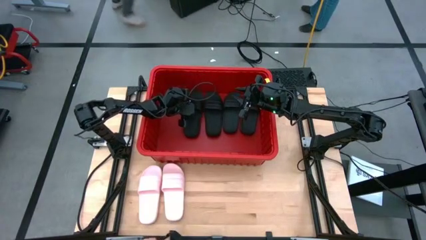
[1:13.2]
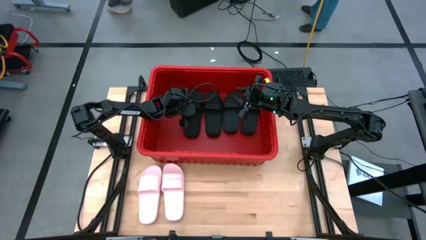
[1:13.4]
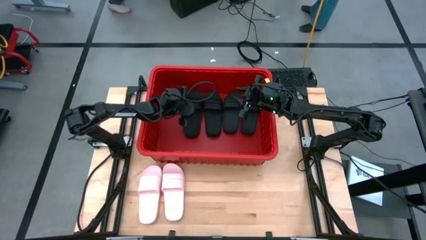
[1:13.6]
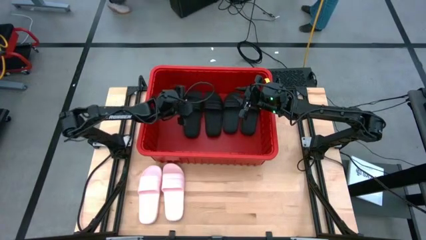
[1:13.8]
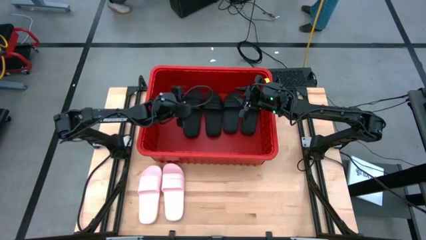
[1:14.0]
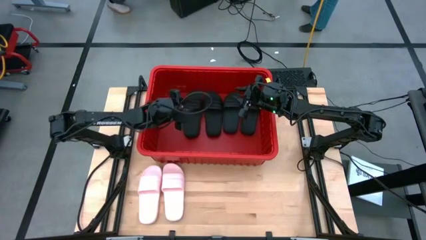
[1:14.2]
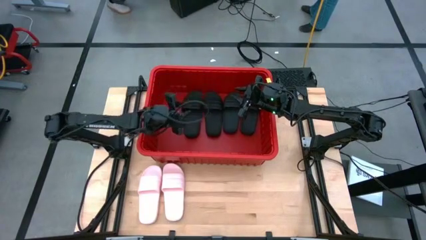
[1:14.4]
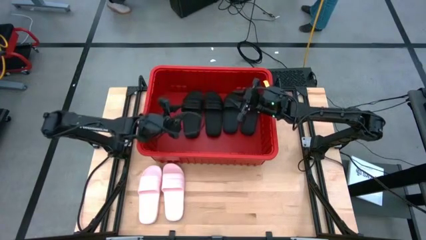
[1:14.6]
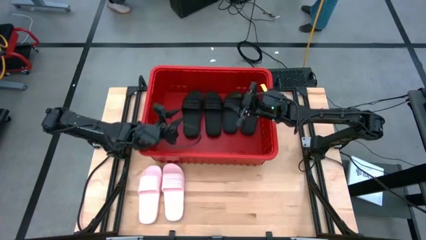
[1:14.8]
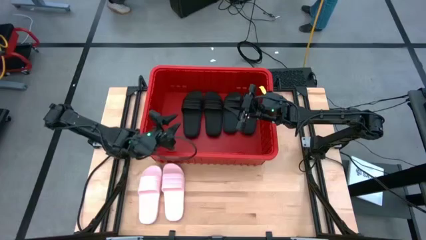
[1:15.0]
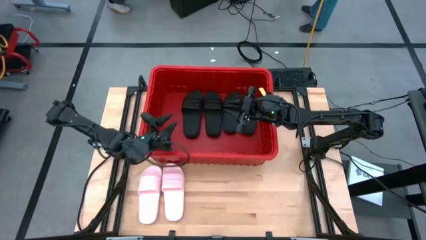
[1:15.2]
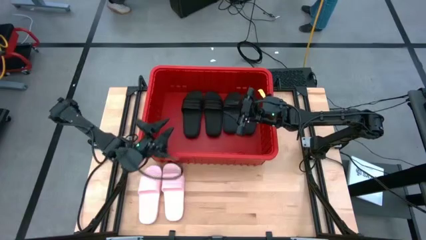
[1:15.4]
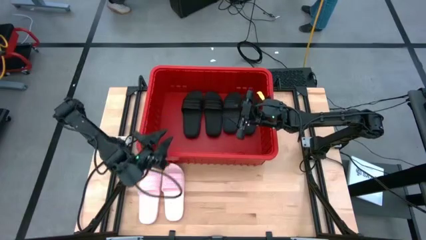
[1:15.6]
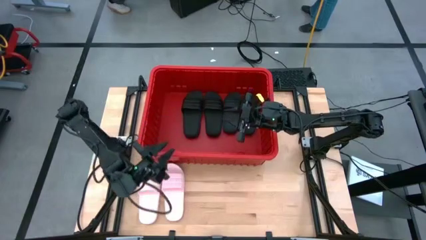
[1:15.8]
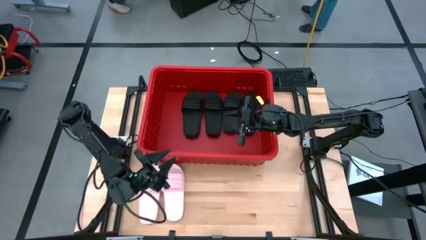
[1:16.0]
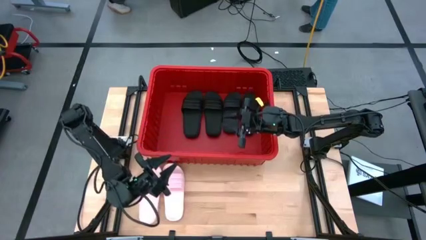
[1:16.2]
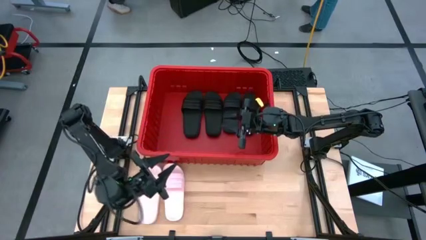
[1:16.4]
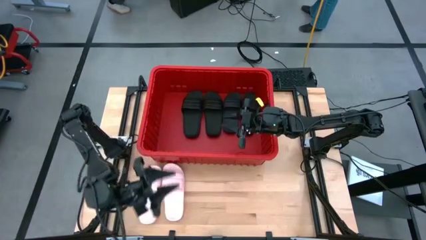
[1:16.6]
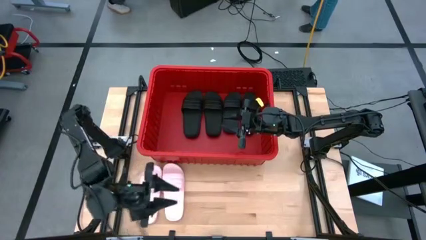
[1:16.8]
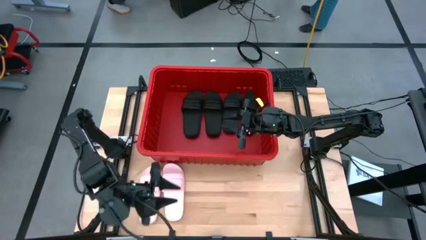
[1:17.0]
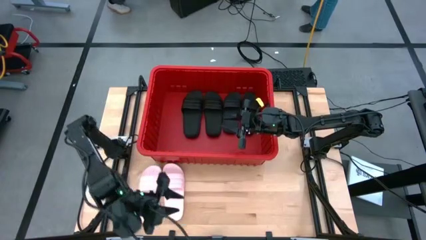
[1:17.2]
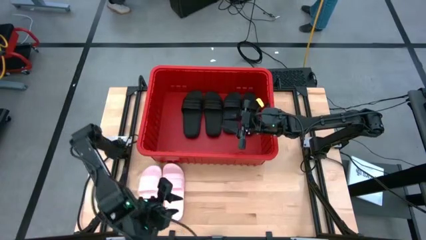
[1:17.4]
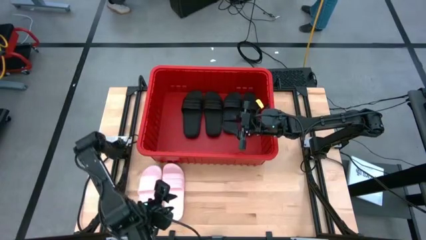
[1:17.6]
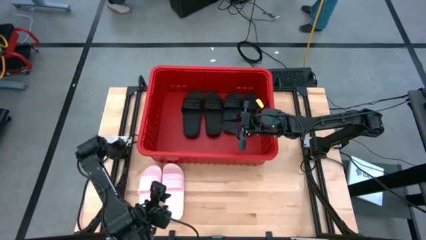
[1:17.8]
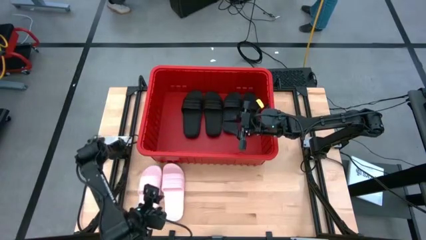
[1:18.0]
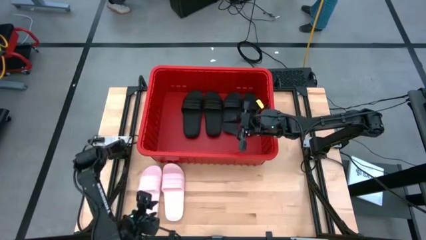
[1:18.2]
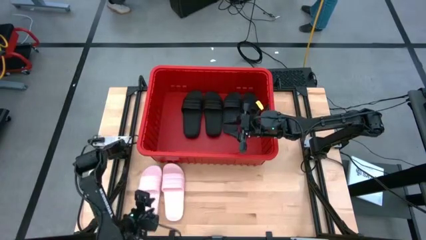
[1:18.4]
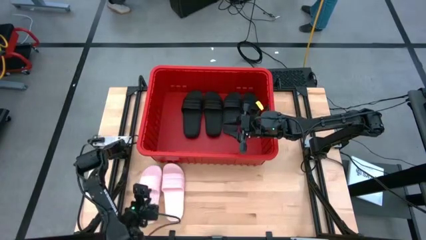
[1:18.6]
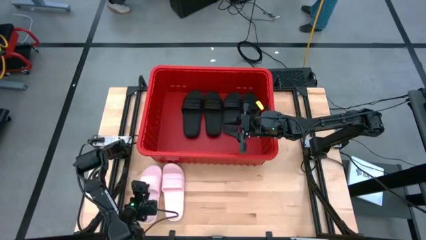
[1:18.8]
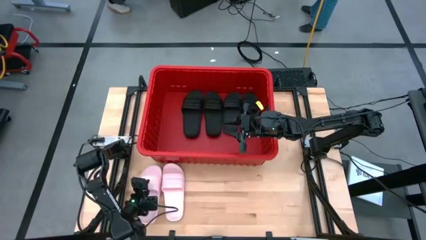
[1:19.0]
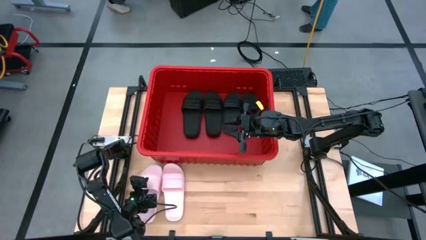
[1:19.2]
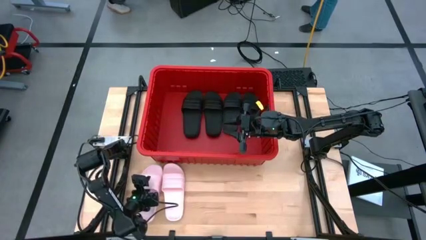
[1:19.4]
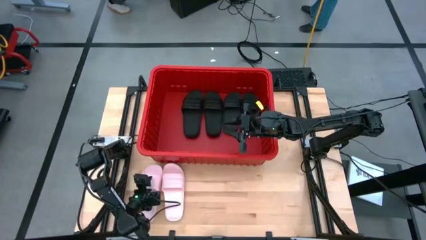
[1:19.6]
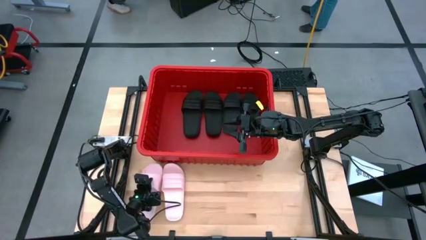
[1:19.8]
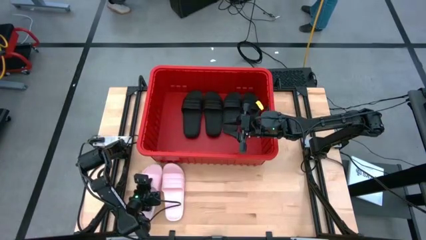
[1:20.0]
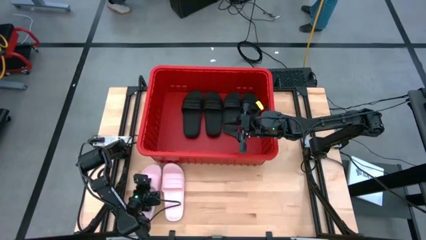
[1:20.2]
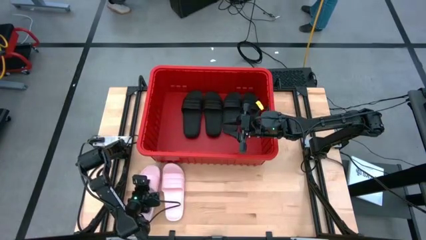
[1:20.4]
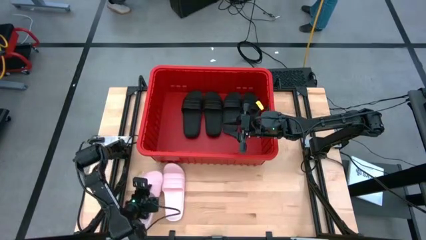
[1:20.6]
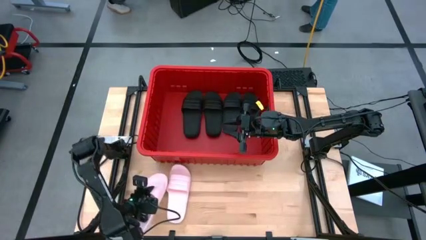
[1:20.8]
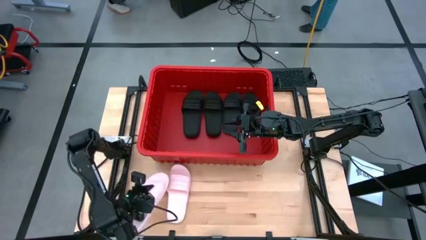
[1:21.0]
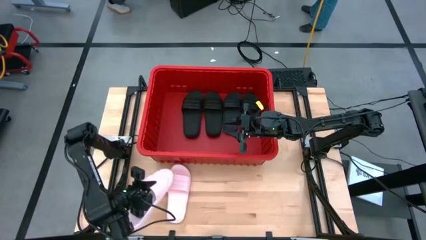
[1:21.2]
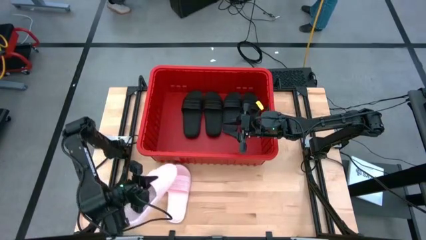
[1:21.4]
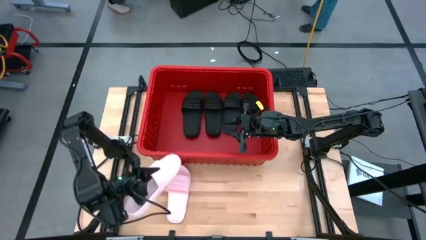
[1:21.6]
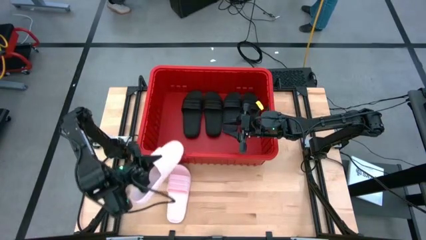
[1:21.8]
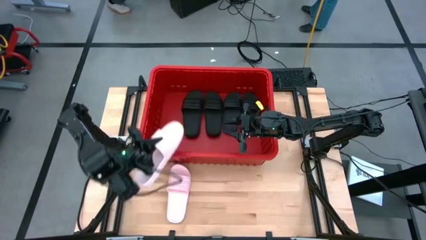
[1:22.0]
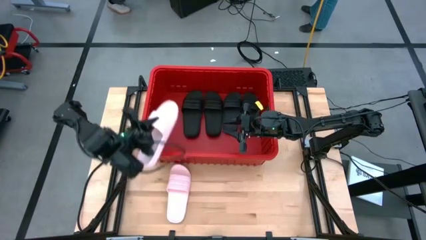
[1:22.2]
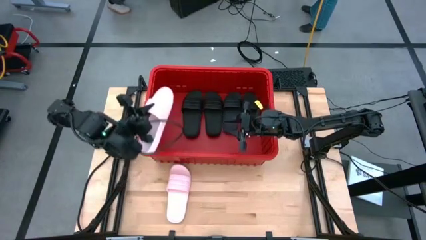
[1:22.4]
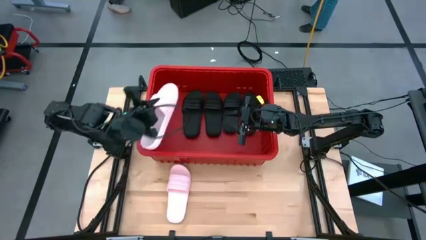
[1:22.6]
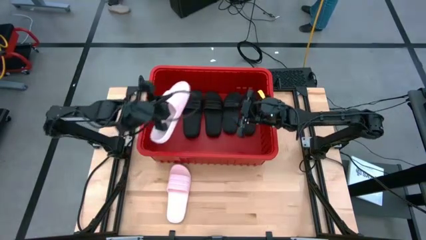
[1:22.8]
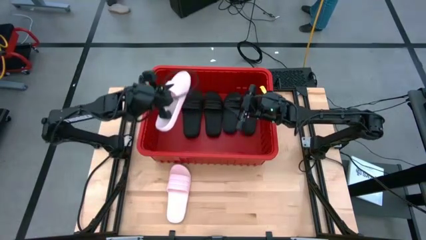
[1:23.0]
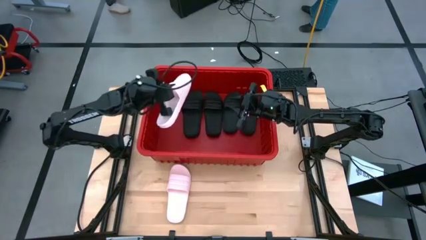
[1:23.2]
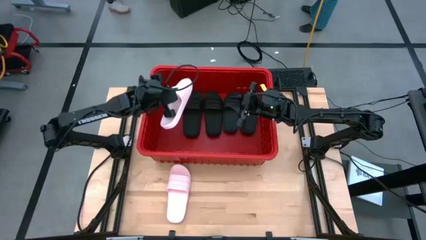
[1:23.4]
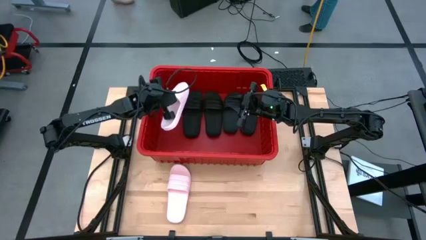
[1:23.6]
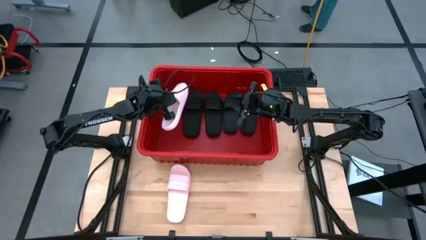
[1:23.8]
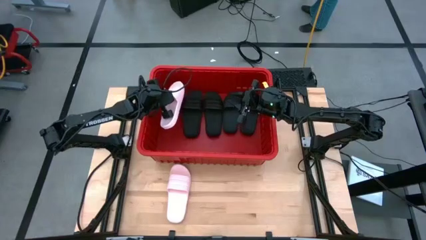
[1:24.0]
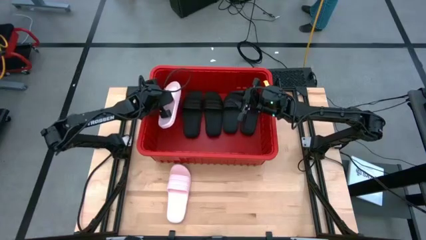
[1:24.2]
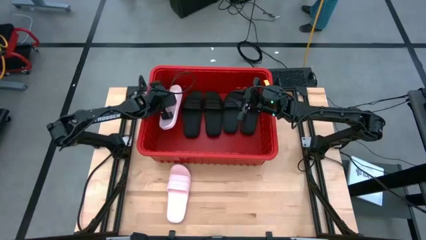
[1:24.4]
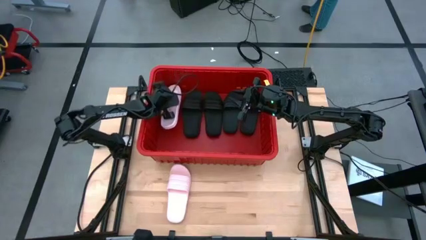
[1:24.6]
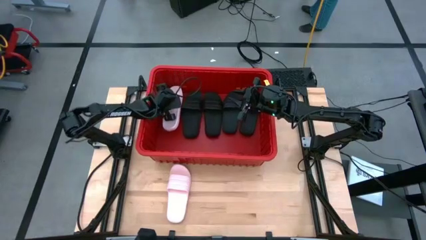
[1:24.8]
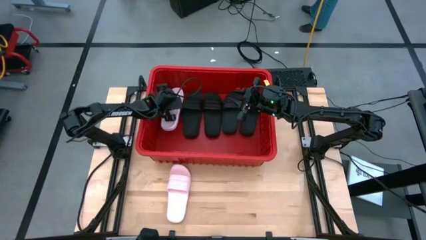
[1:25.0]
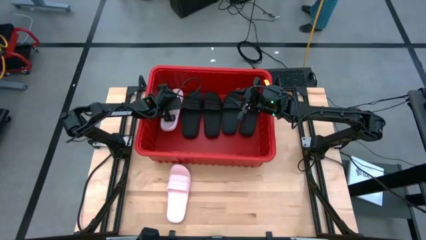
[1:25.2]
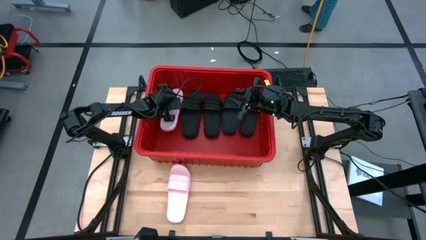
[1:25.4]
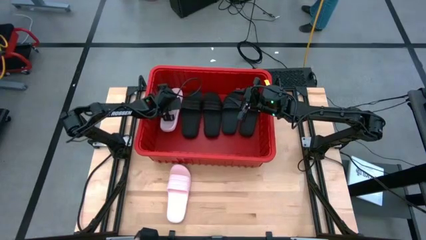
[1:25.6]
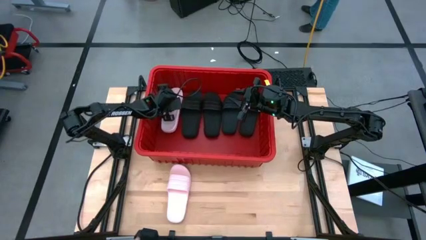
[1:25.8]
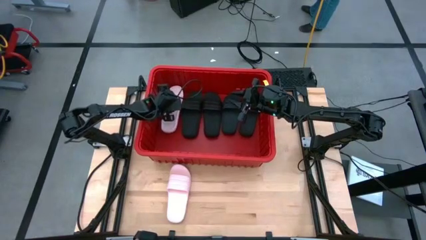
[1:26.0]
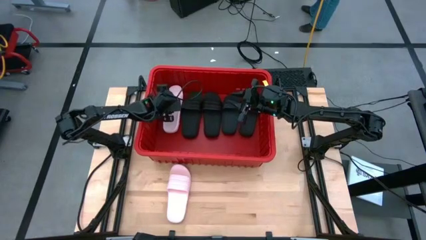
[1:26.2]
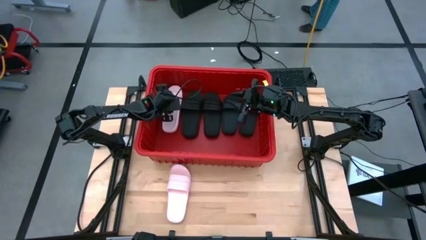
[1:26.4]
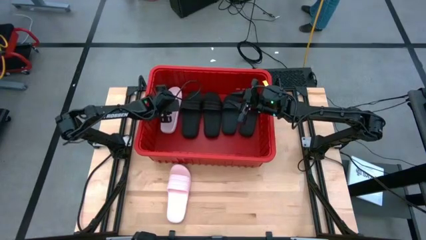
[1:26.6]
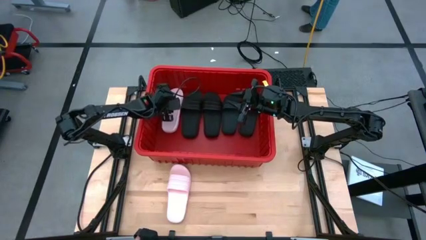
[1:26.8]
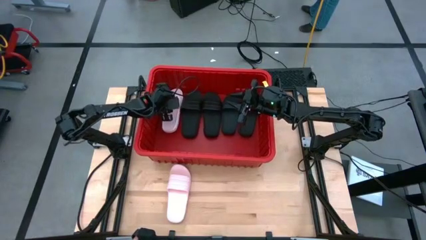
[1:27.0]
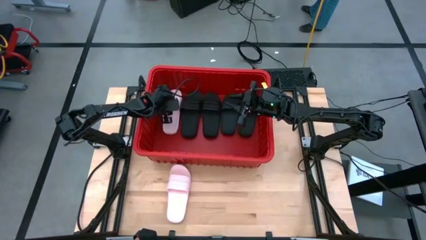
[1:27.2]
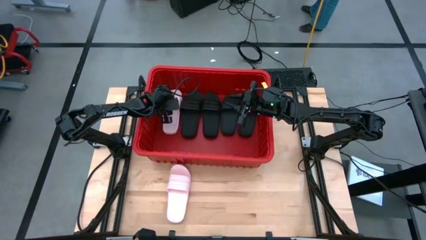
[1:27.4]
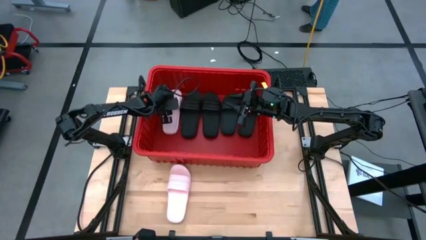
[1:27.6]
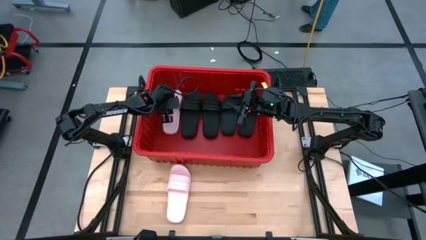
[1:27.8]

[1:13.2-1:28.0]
Task: Pick and place slides into bin
Put the left pink slide into the red bin

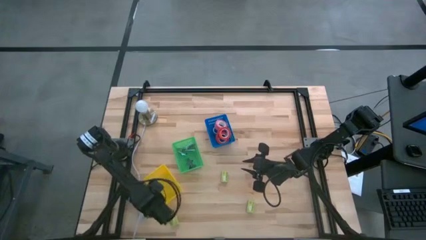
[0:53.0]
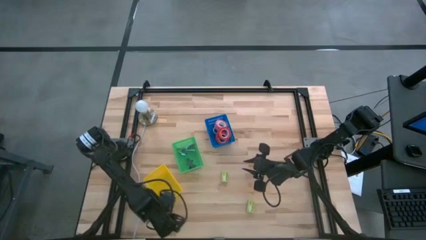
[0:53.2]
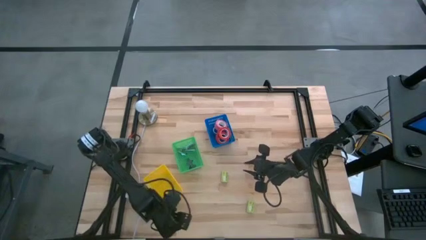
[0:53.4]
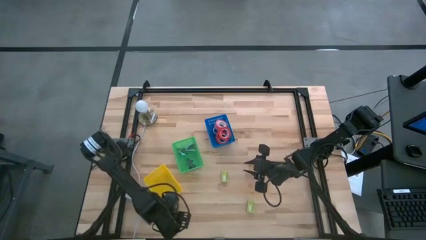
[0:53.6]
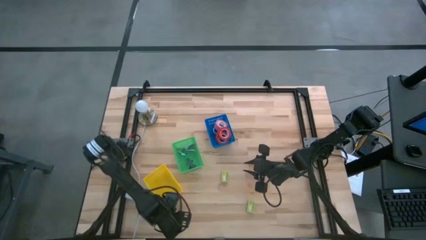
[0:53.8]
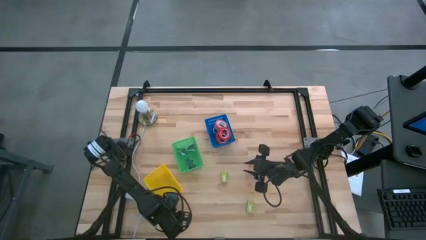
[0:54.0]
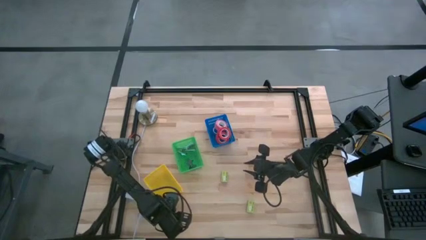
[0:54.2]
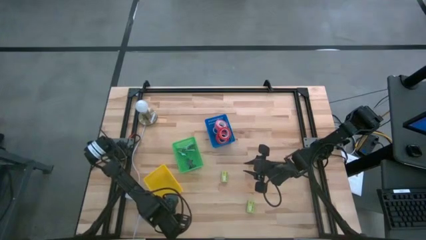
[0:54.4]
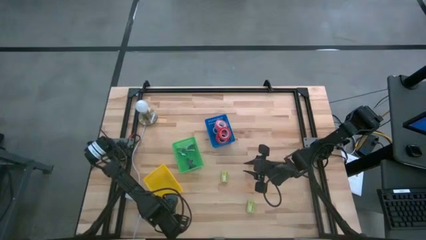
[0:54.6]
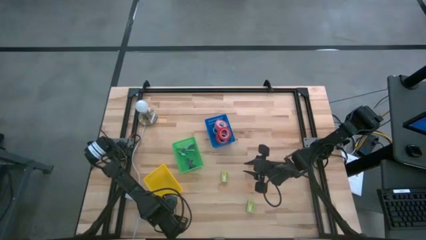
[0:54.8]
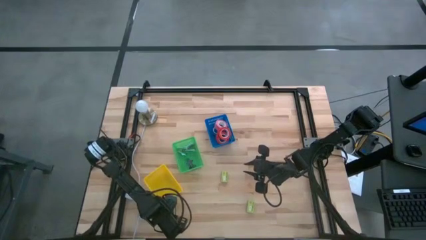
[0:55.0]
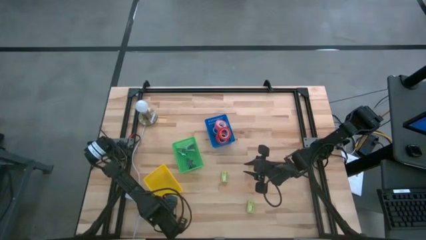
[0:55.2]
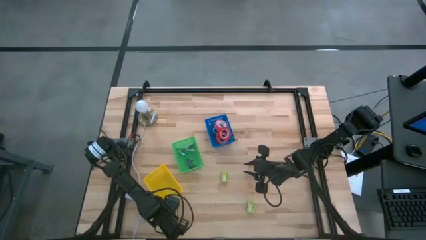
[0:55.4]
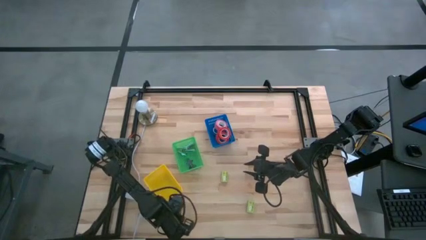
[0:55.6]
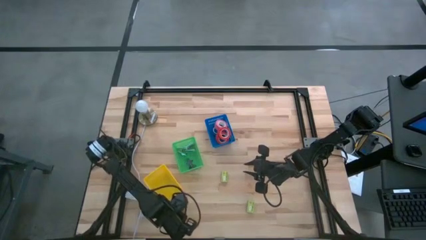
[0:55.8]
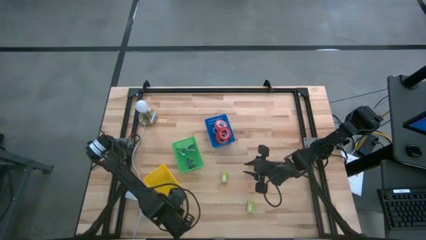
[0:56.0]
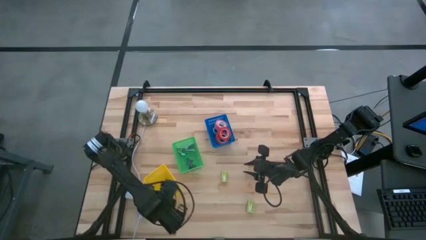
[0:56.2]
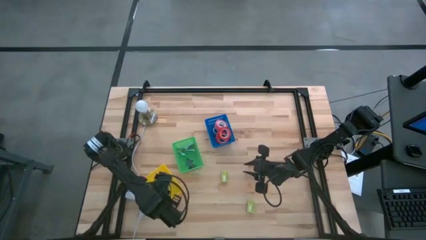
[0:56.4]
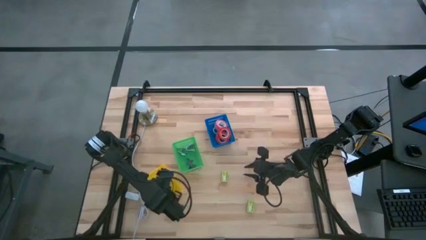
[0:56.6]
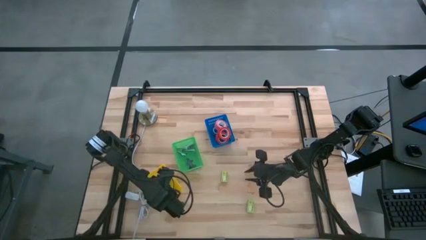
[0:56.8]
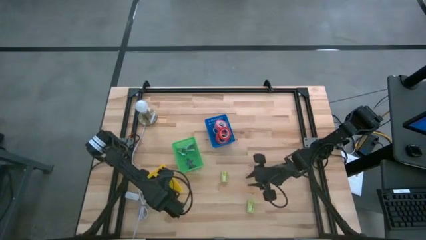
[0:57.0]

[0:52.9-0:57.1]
Task: Pick and place Stapler, Stapler remover, tape
Put the bottom left green staple box into the yellow basket
